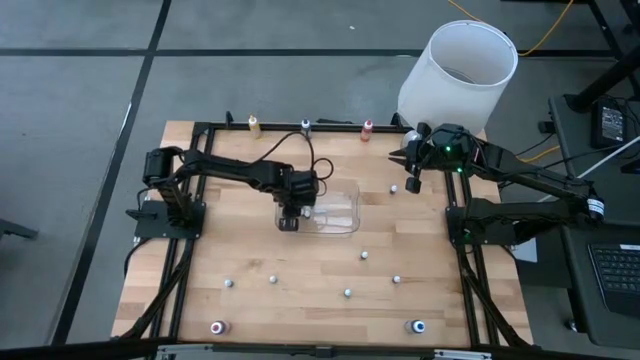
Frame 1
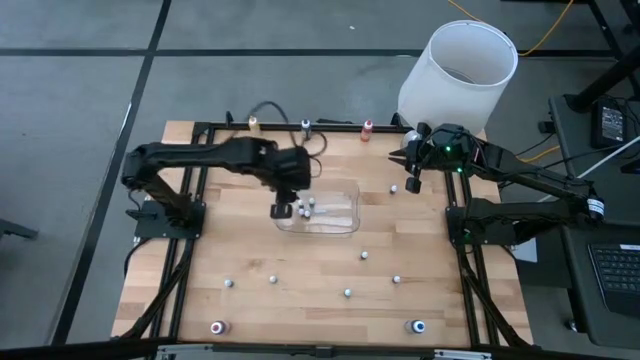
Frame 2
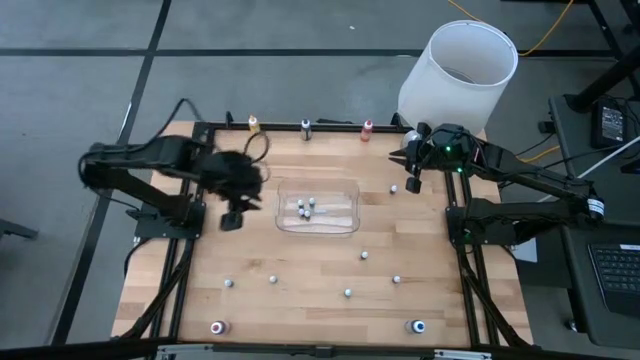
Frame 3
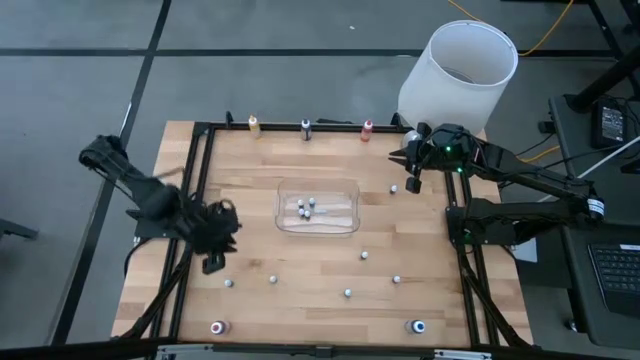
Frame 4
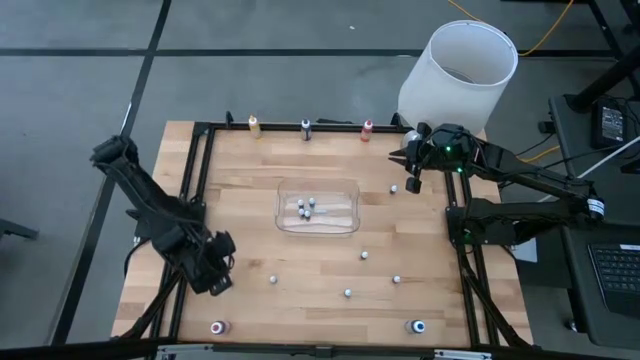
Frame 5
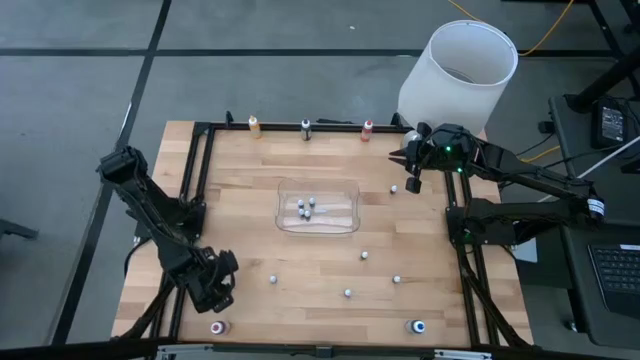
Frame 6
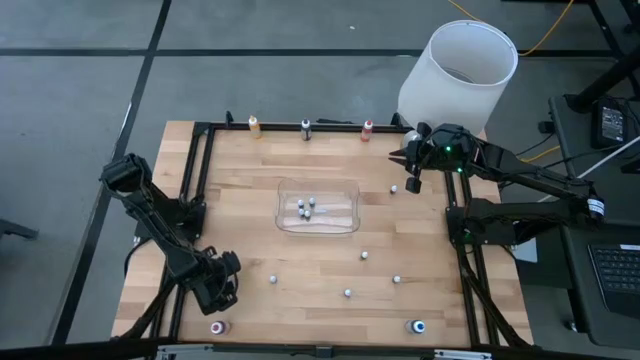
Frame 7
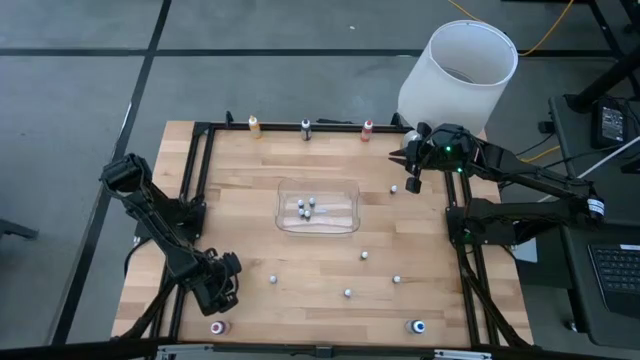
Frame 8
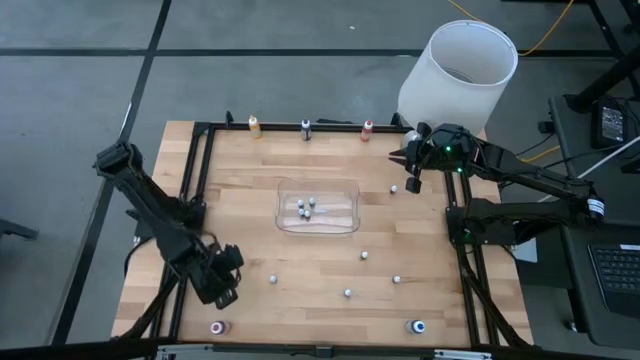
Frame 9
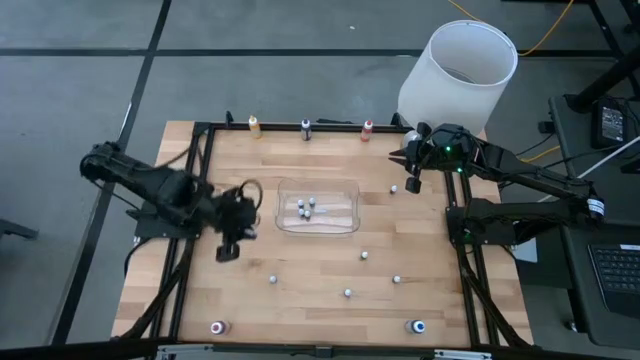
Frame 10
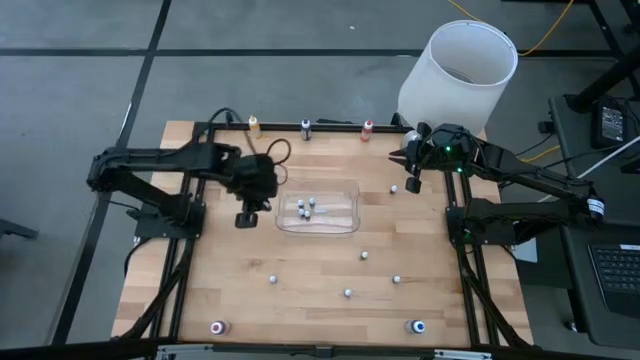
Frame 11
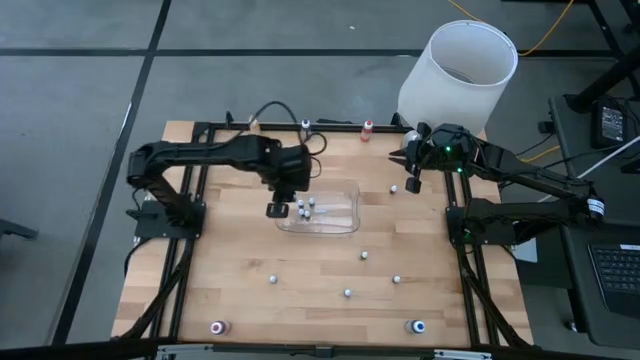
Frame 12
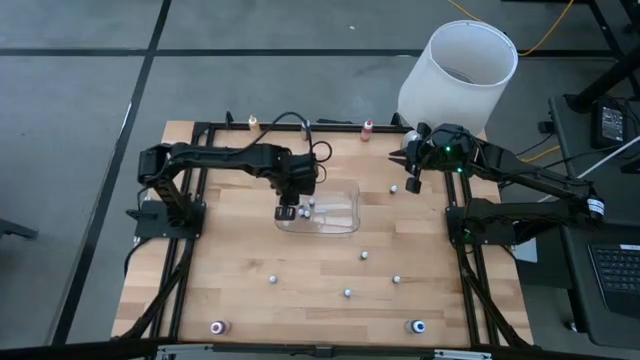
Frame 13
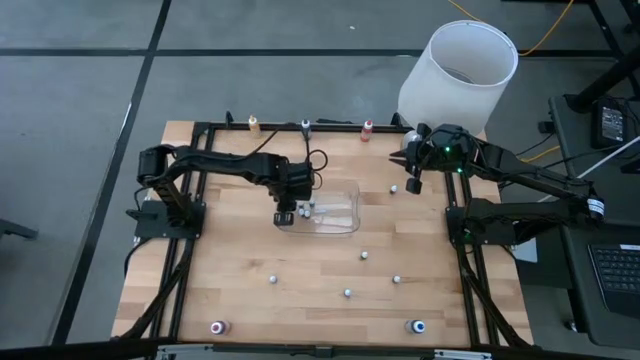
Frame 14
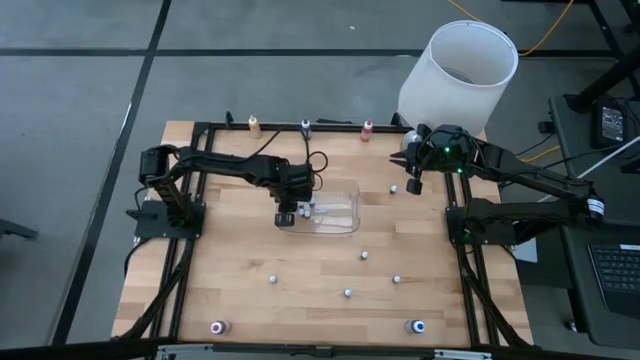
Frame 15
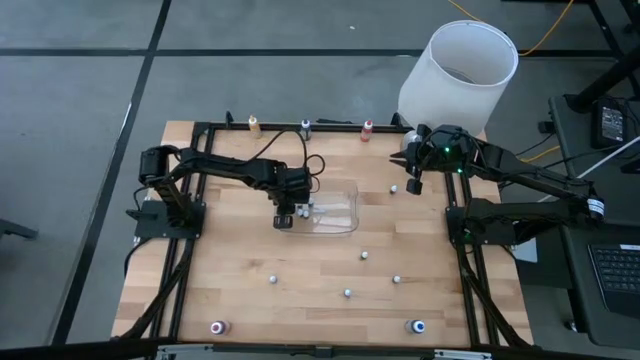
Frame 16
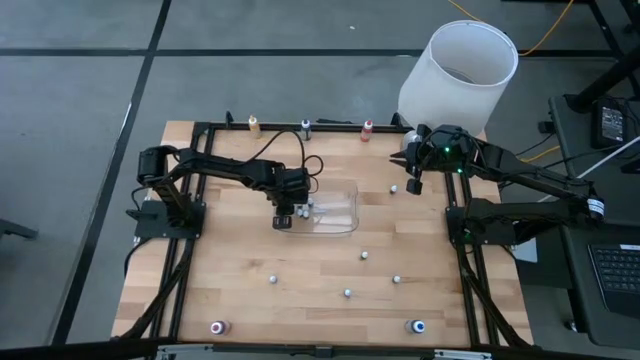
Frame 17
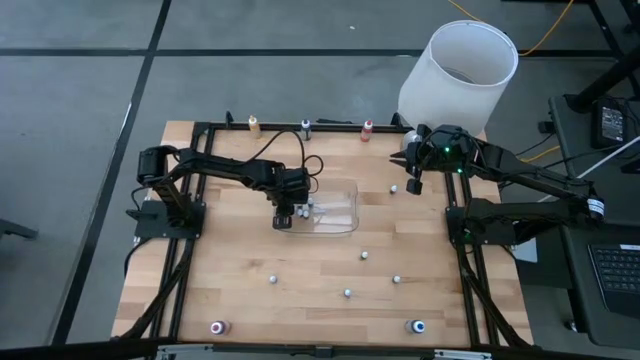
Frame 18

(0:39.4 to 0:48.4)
Task: Pick & Place food coloring
Put the blue food coloring bottle into the transparent bin

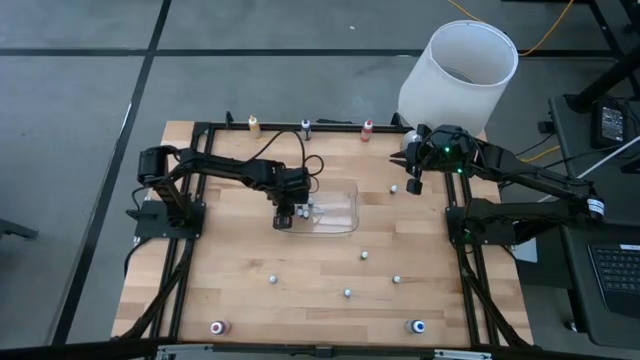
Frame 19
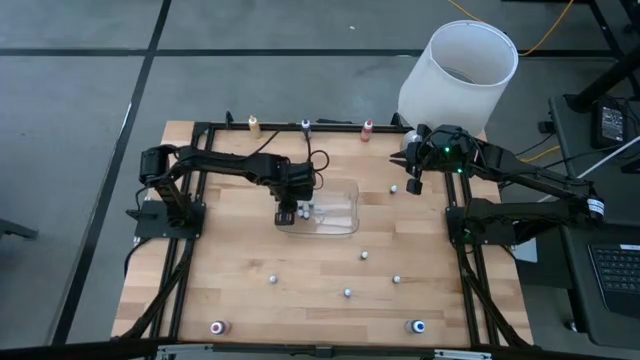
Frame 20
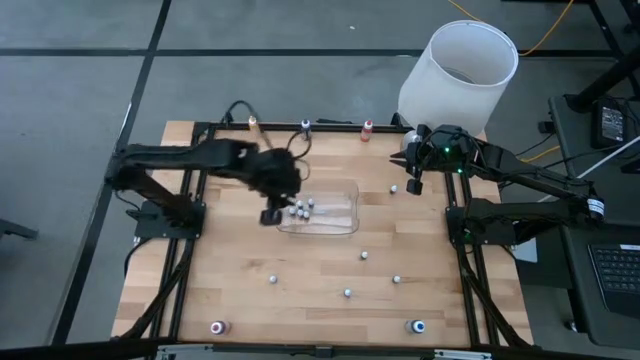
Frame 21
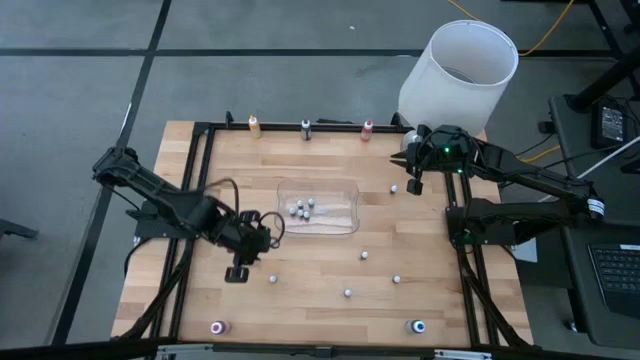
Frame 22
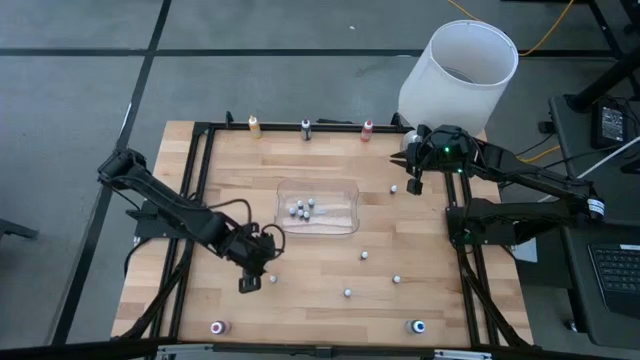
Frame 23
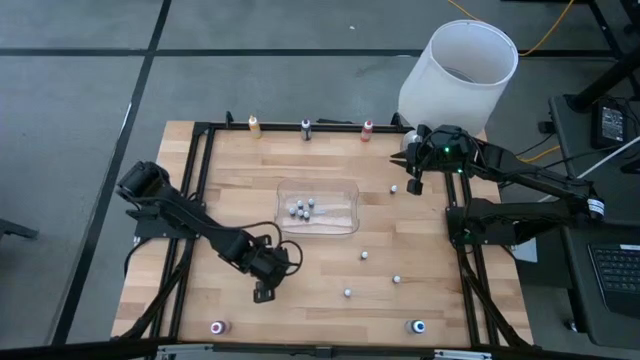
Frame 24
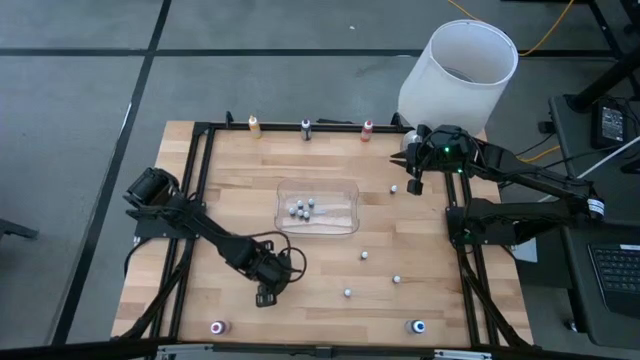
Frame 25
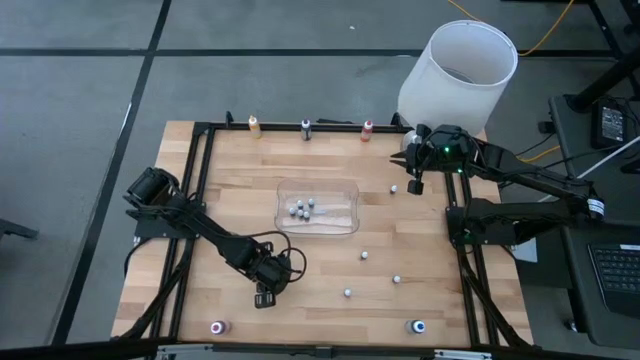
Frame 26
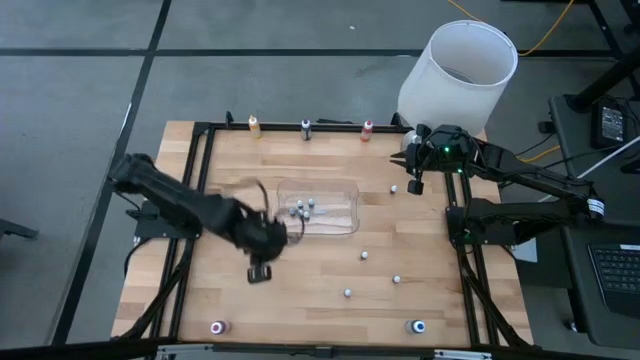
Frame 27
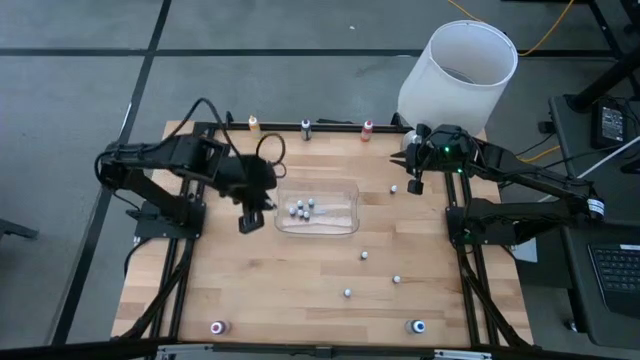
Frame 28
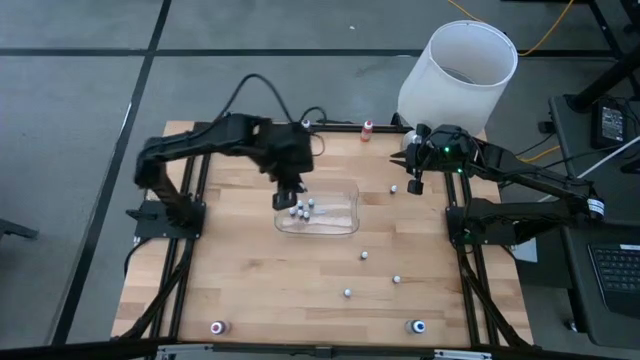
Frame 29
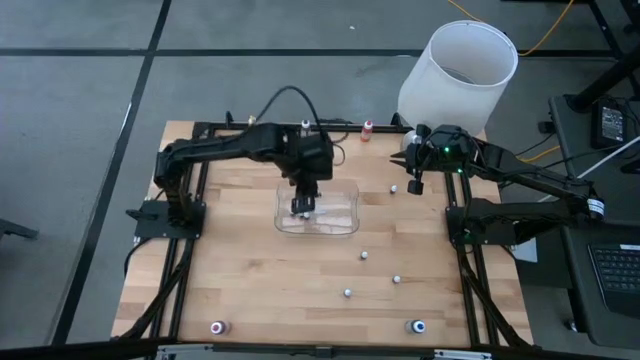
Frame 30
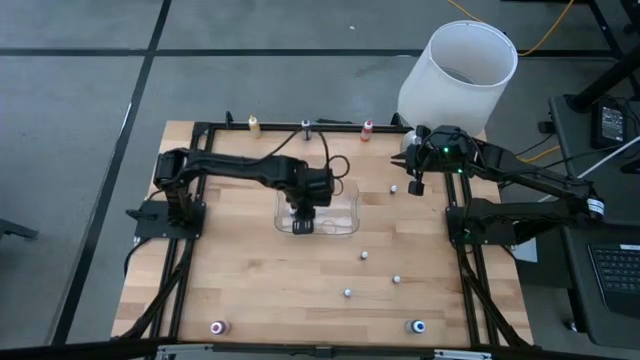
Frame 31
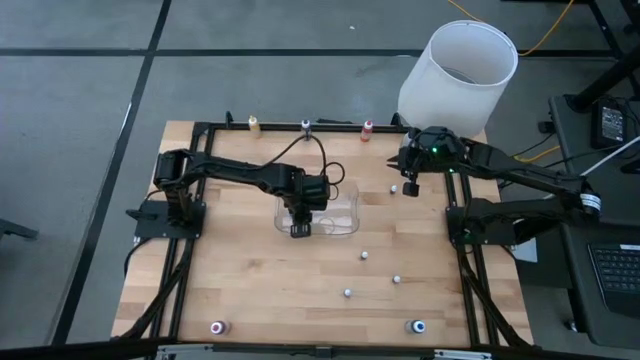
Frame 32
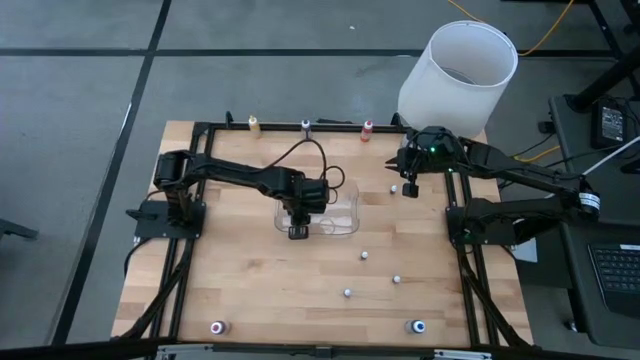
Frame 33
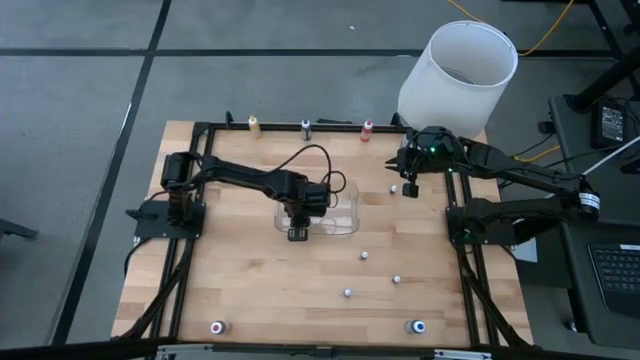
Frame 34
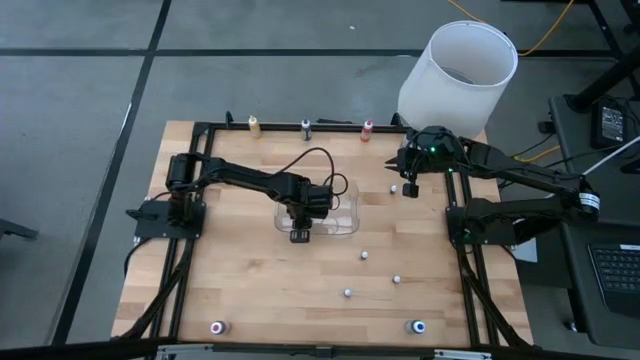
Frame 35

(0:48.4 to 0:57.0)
Put the black food coloring bottle into the transparent bin

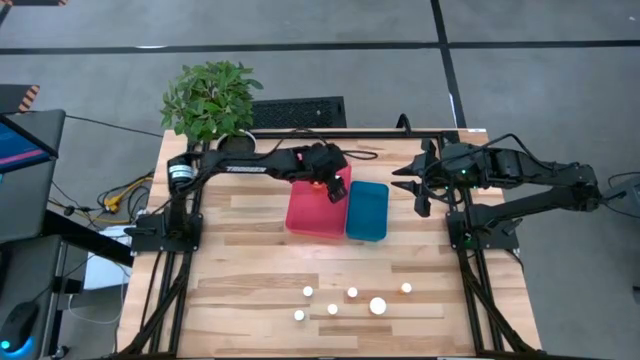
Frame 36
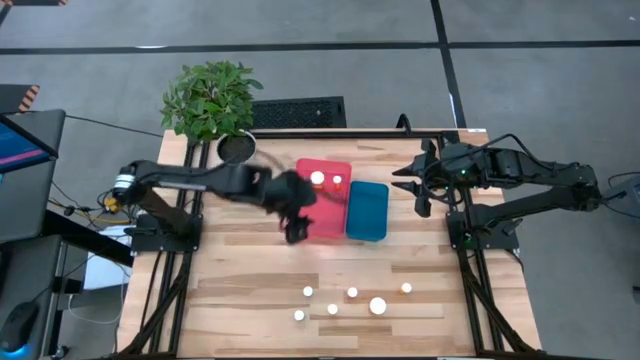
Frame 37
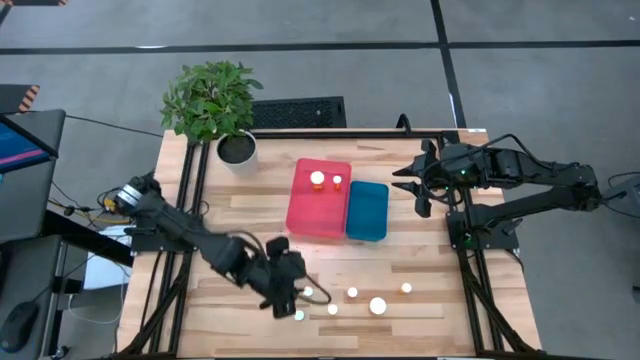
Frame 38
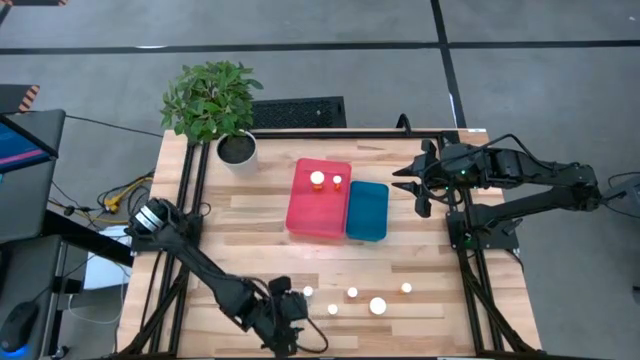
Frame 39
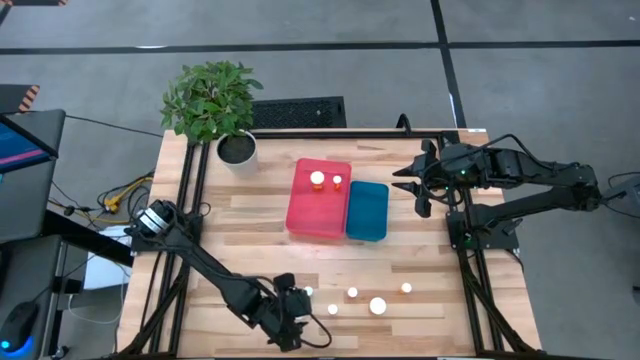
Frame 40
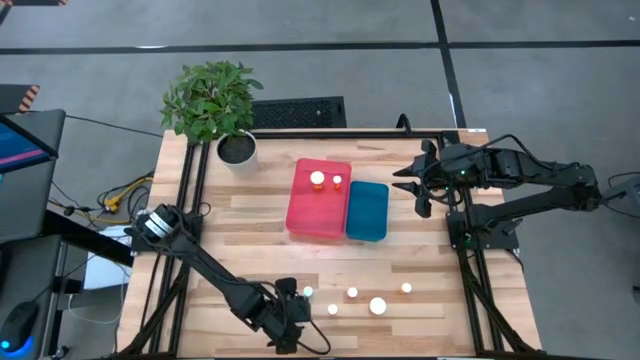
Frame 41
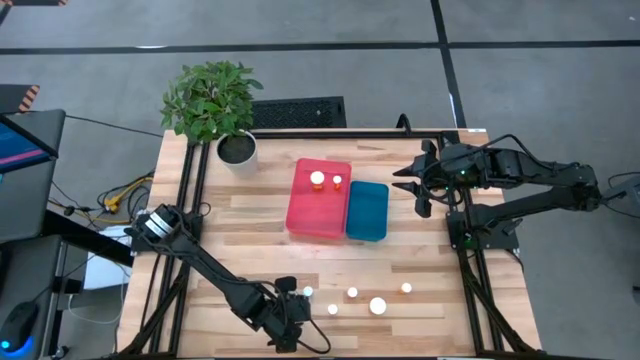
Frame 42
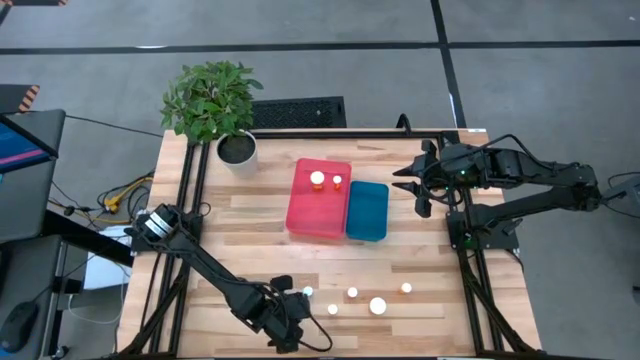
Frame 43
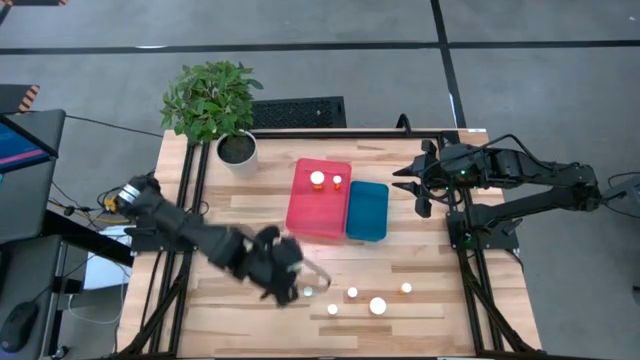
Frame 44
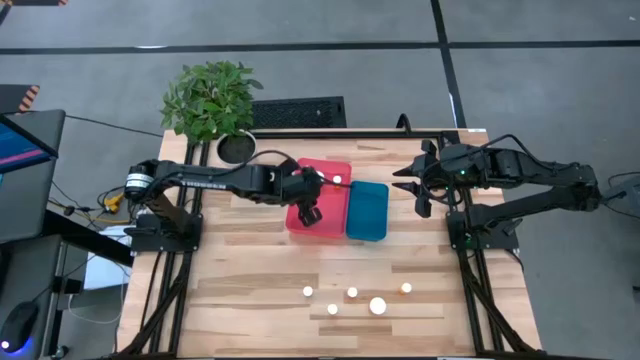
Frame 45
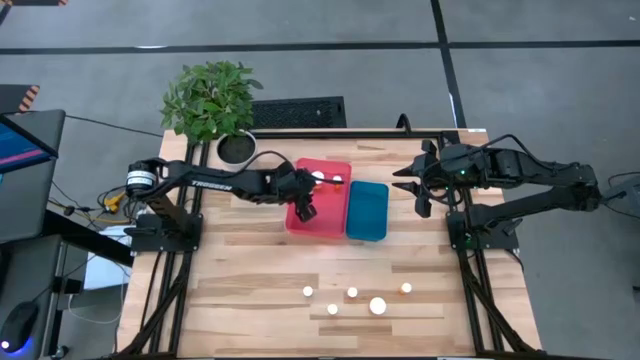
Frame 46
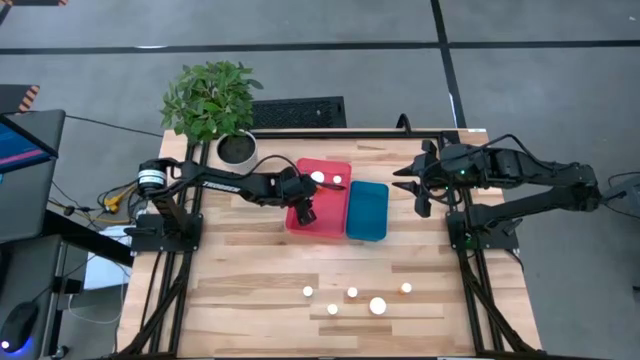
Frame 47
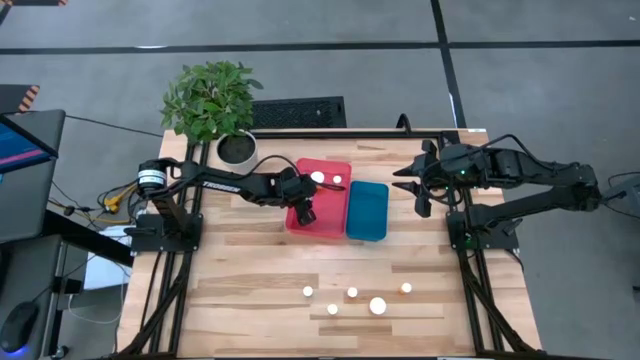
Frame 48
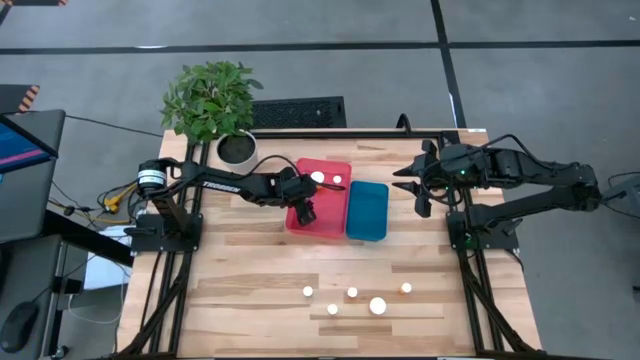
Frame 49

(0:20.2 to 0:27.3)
Task: Pick and place medicine bottles into bin by pill shape (circle, oval)
Put the blue pill bottle into the red bin
